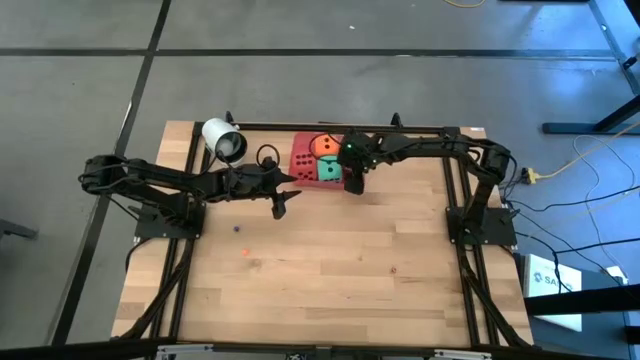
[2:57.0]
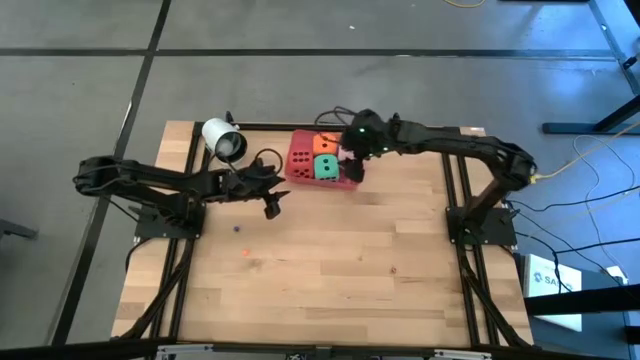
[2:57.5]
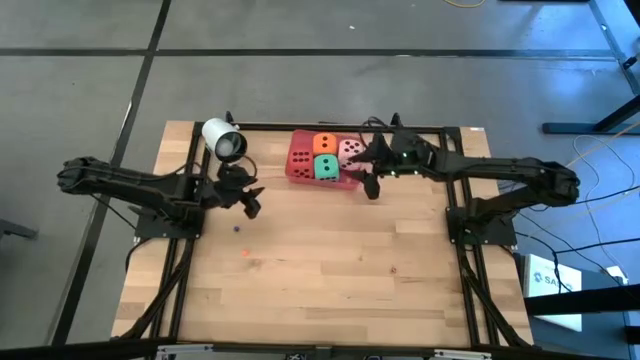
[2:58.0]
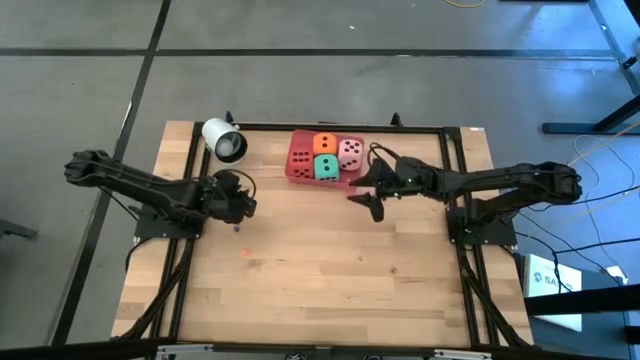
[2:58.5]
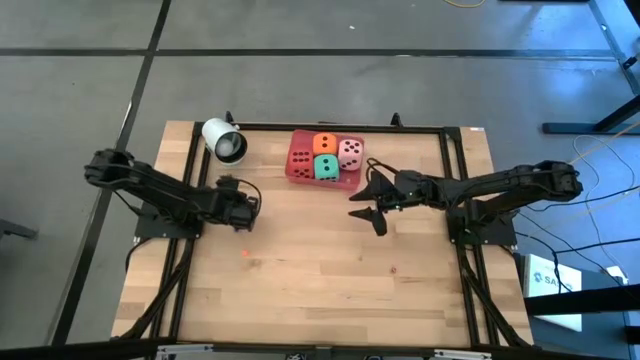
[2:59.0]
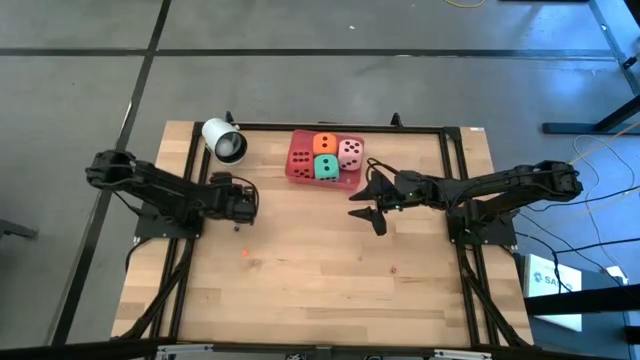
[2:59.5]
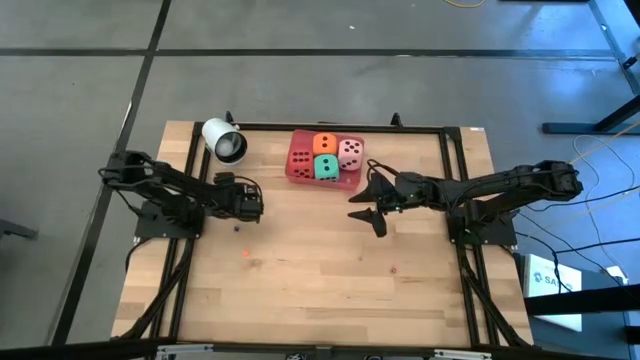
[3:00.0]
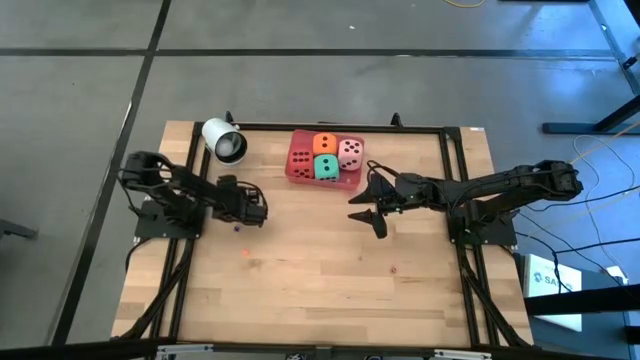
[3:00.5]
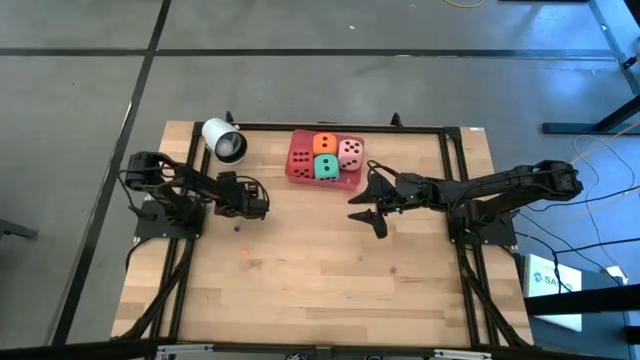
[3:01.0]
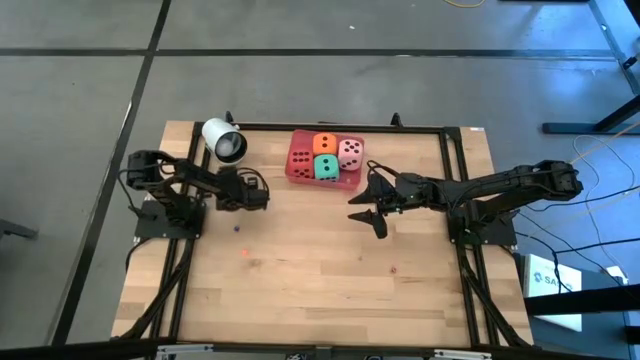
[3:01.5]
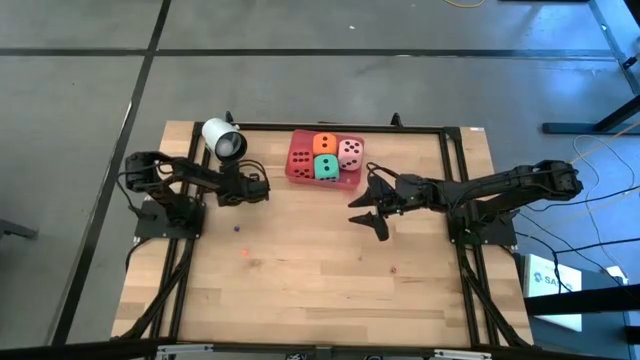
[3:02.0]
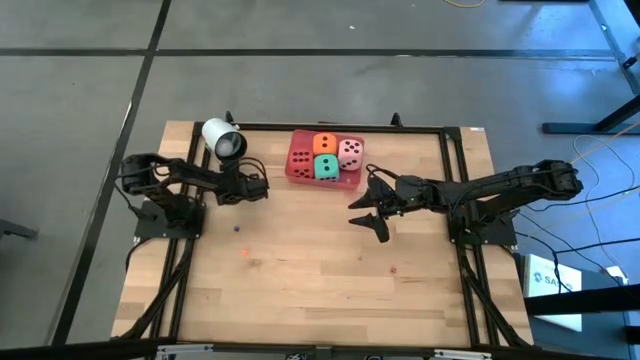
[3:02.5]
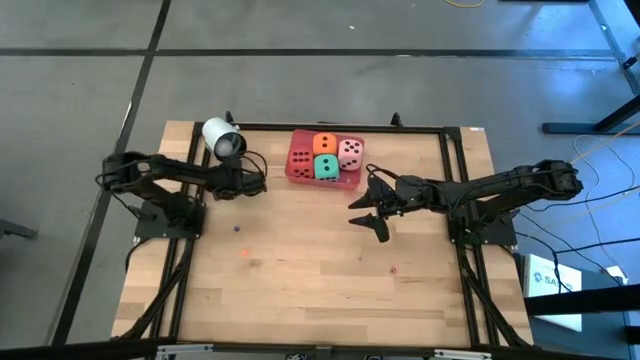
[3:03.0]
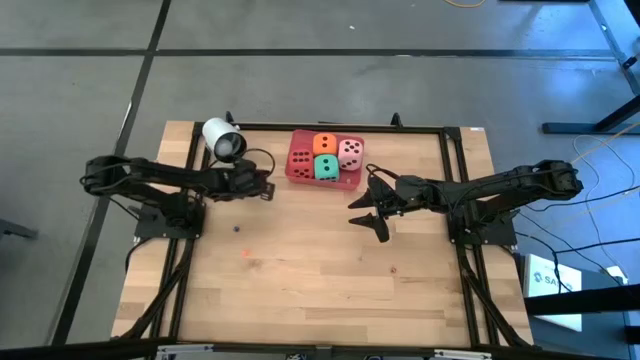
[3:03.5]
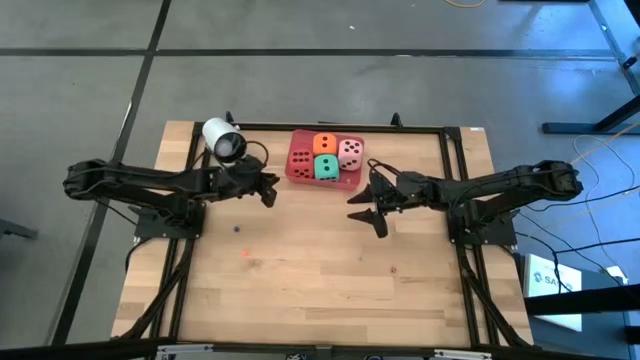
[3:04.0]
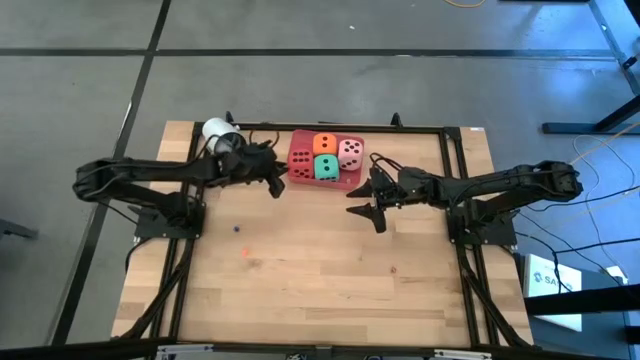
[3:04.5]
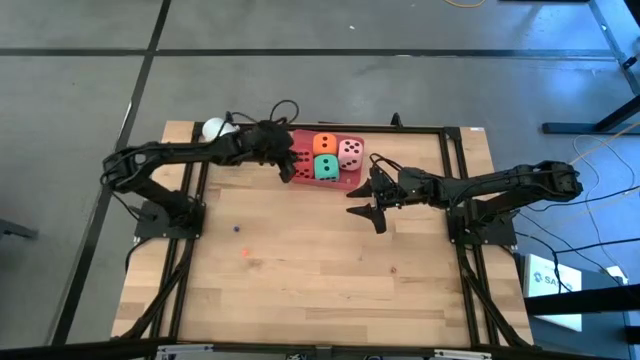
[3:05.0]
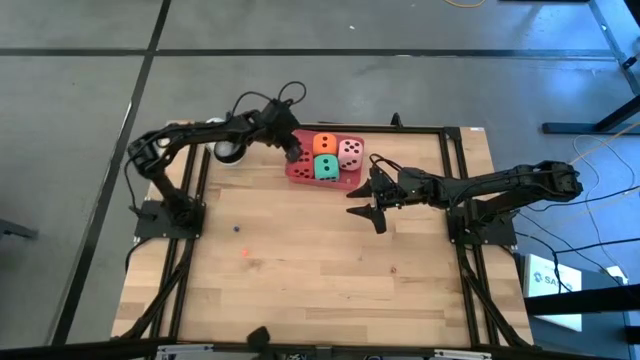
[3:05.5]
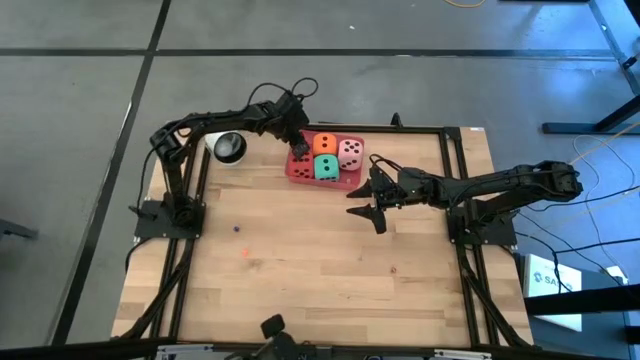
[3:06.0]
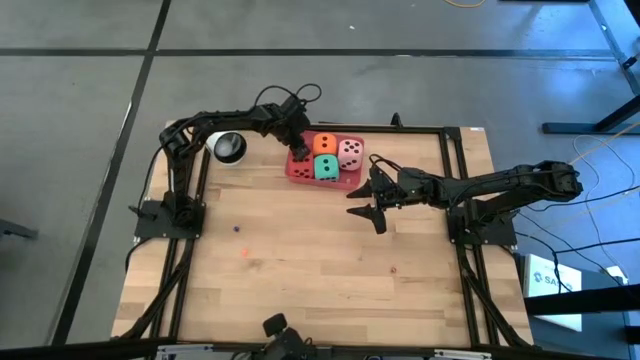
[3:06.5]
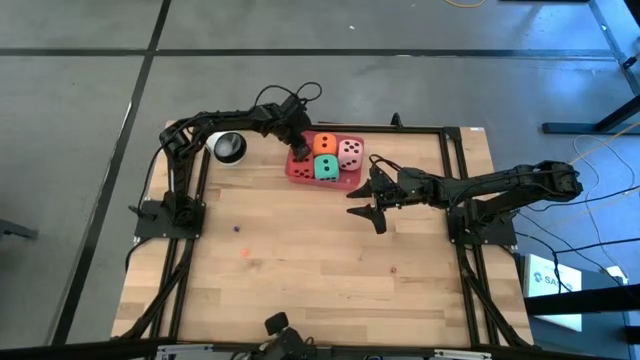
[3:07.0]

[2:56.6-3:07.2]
Task: Pick & Place Dice
Put the green die into the pink bin

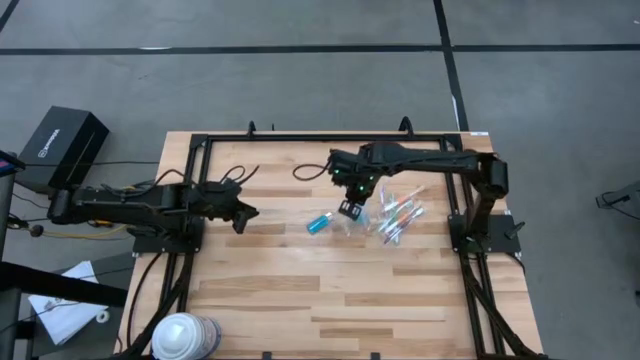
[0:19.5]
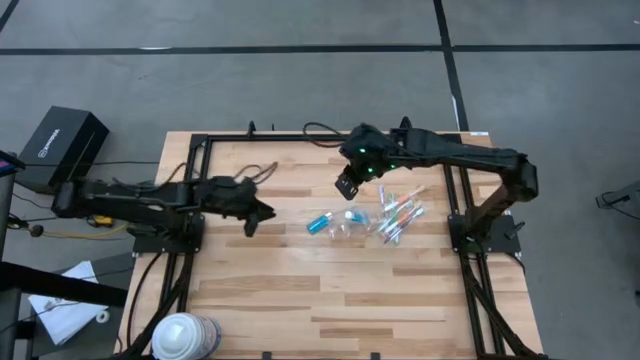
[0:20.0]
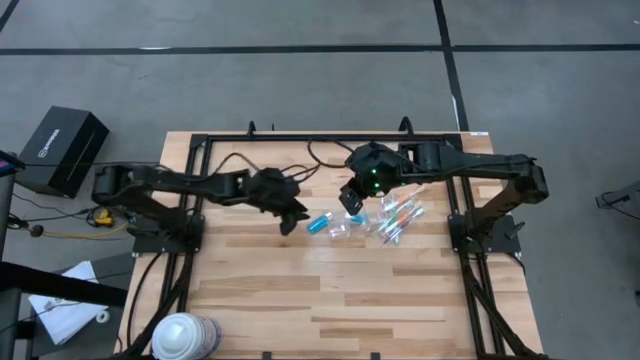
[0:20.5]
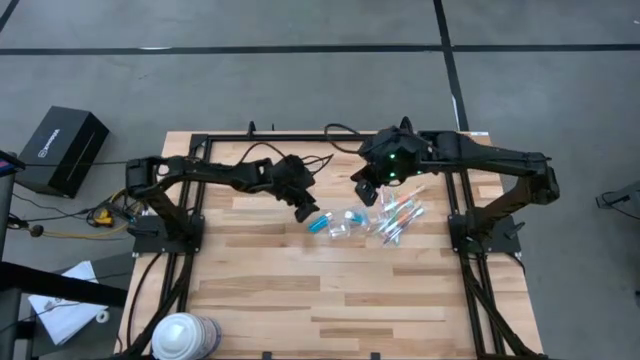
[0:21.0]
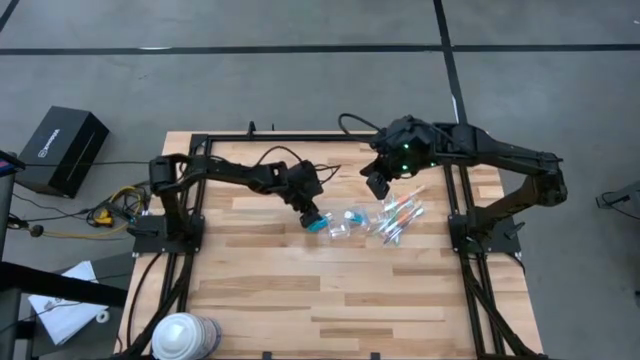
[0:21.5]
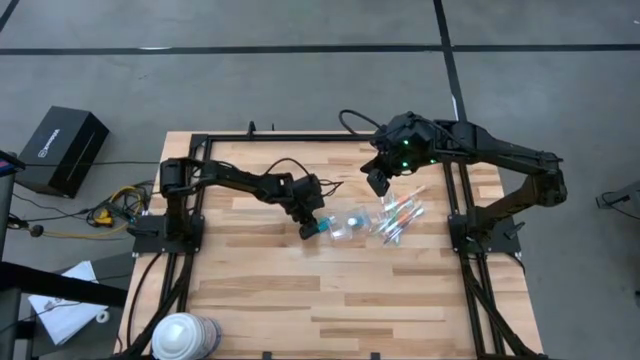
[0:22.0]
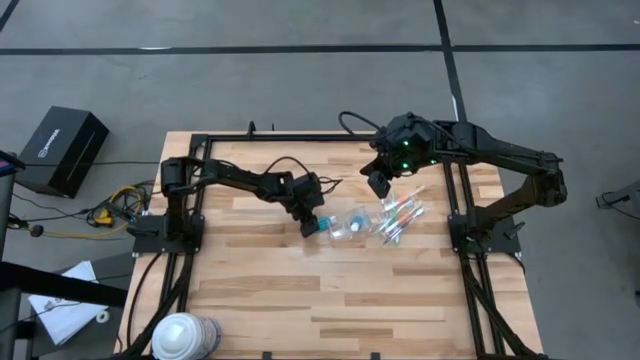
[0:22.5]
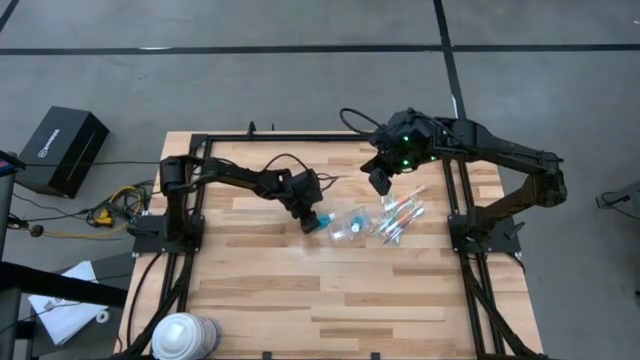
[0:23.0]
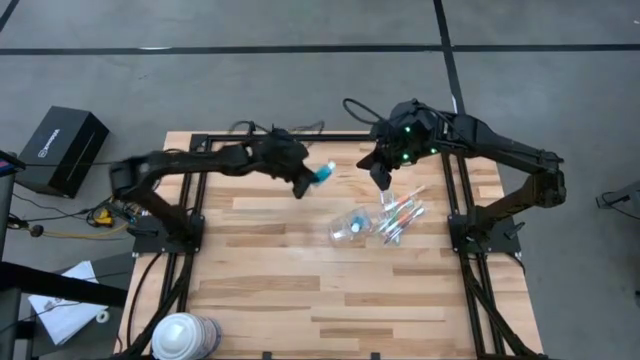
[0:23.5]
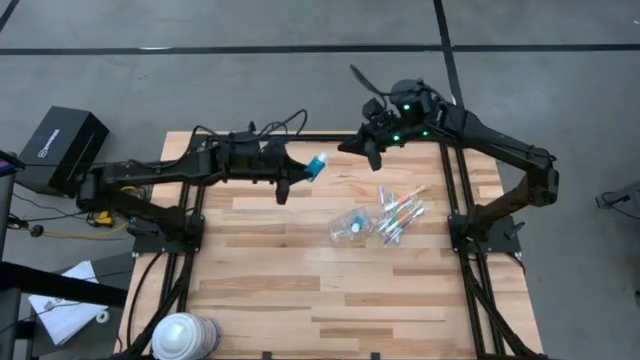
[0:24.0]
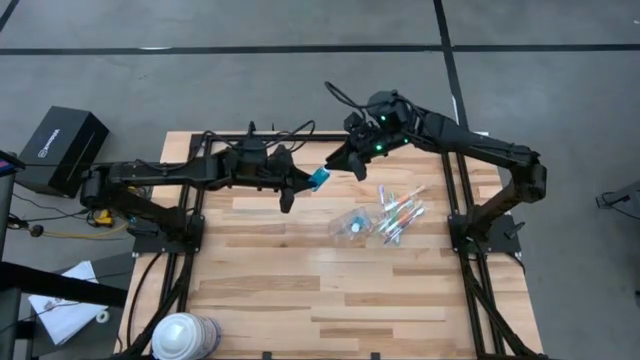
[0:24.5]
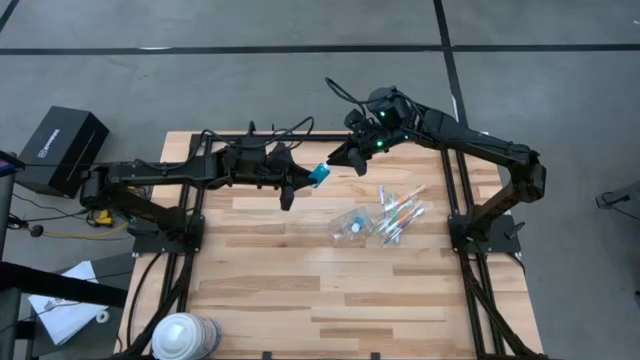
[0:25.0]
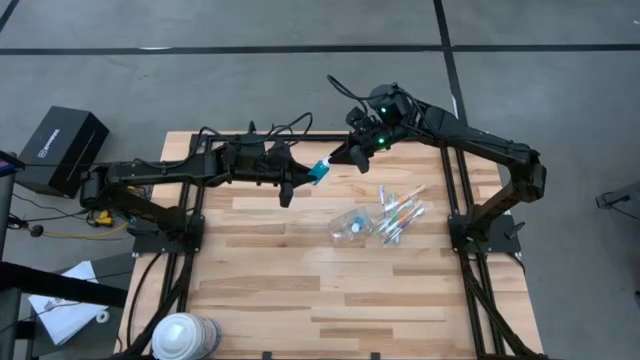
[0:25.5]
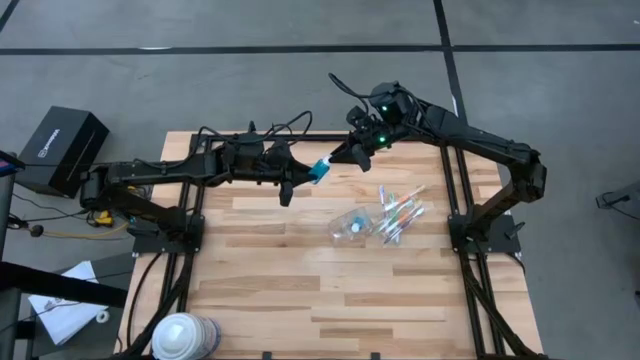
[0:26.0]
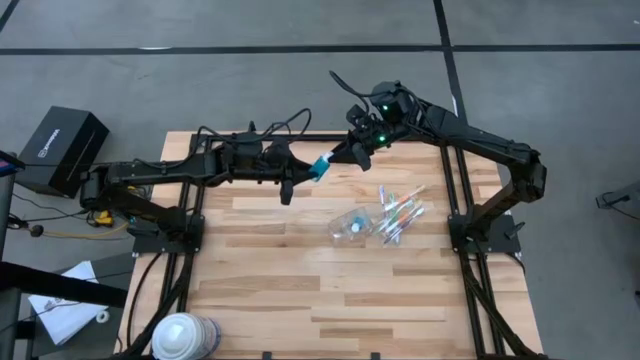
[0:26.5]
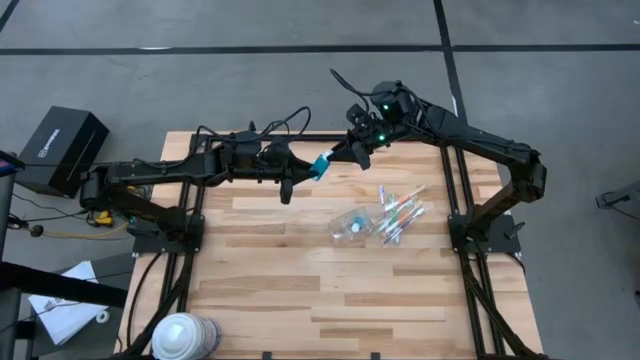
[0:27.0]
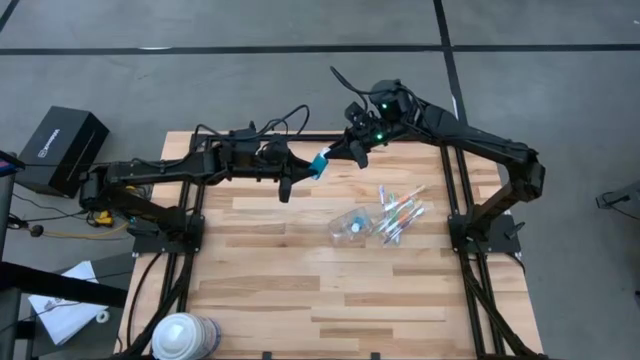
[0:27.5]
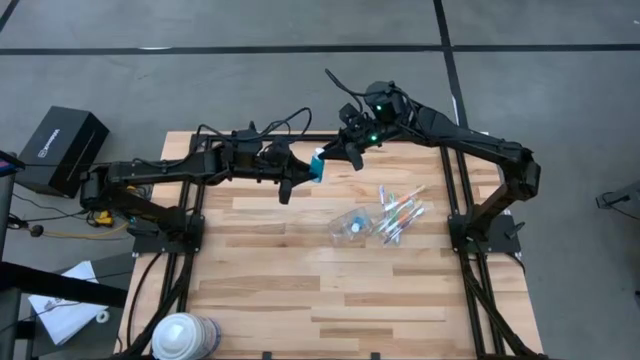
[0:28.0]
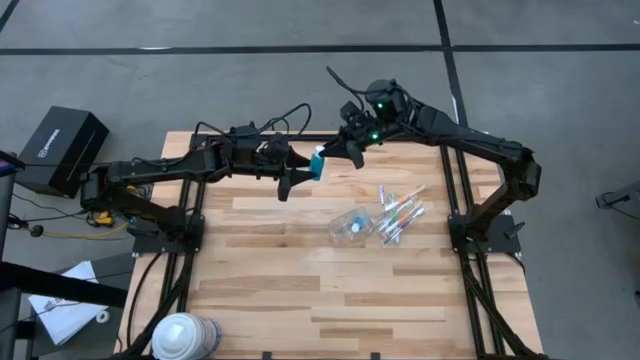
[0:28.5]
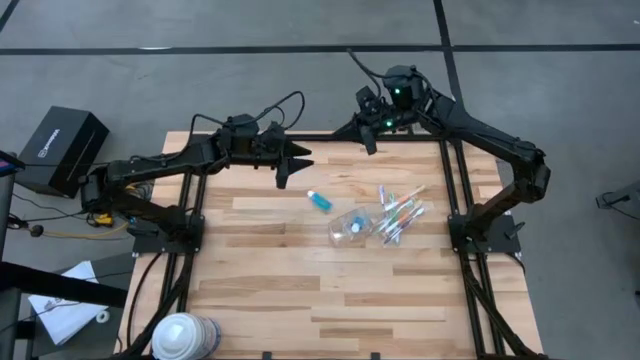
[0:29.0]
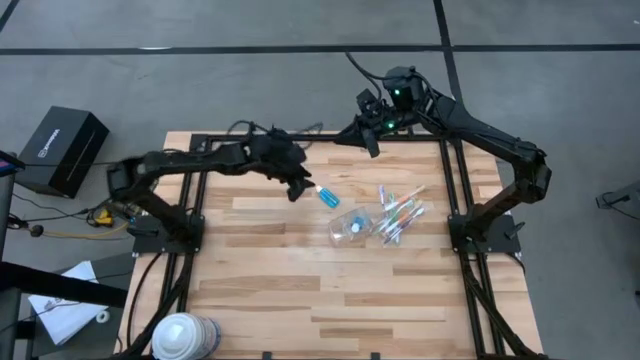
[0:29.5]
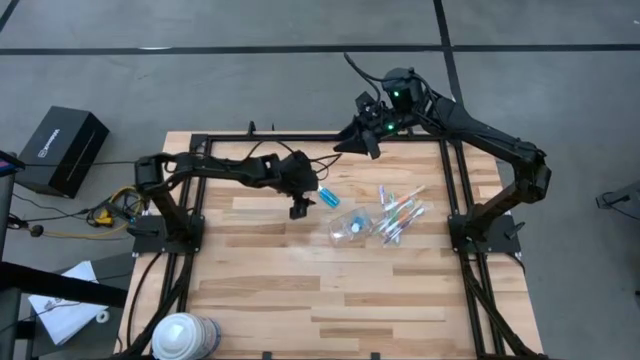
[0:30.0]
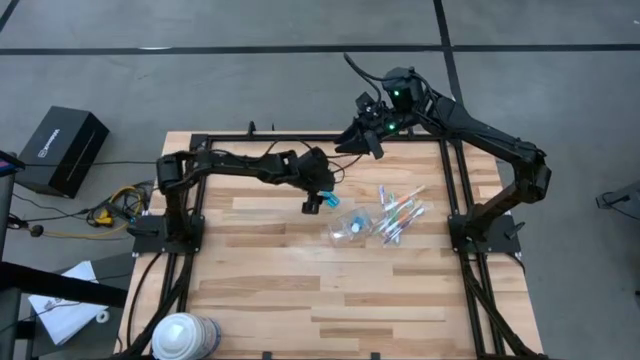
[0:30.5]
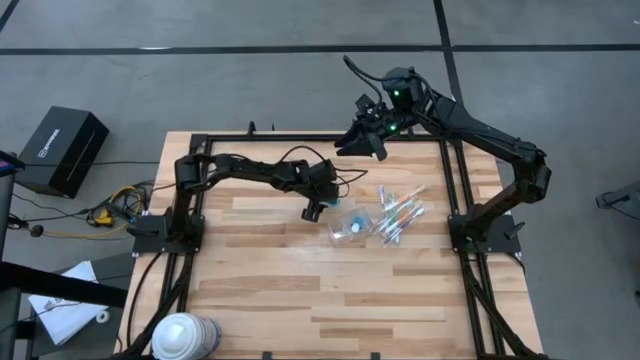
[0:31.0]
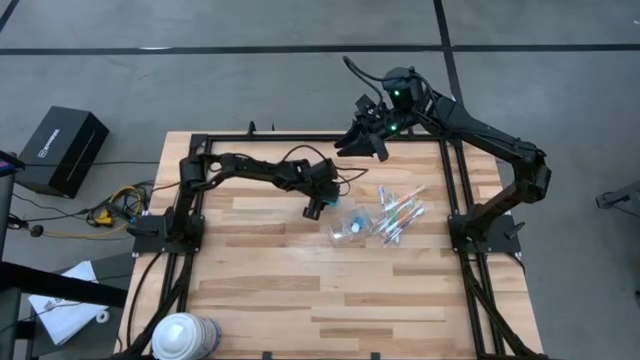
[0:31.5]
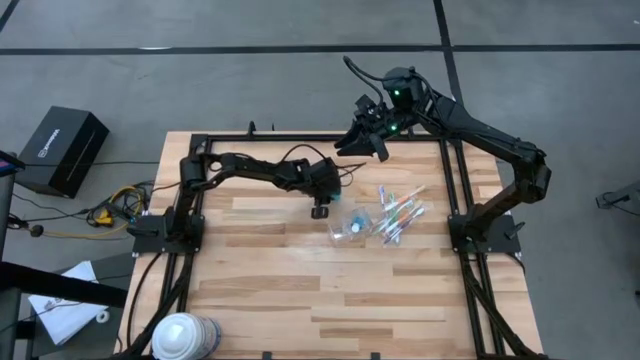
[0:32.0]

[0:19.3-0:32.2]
Task: Pick & Place toothbrushing station
Put the blue mouthwash into the transparent organizer
